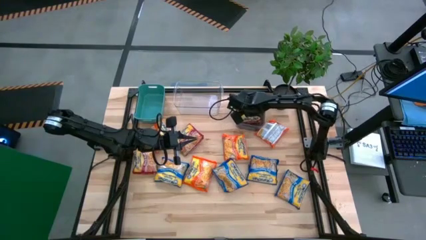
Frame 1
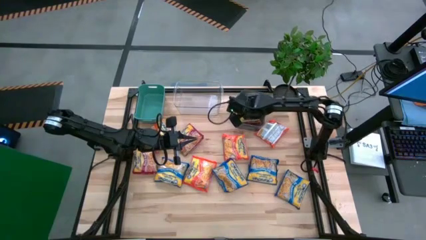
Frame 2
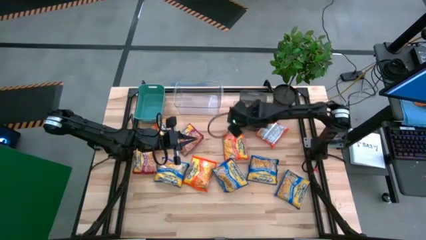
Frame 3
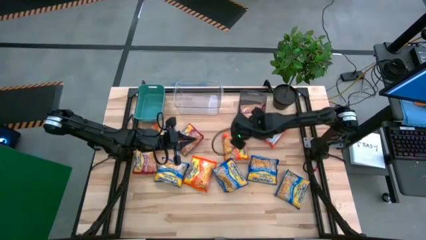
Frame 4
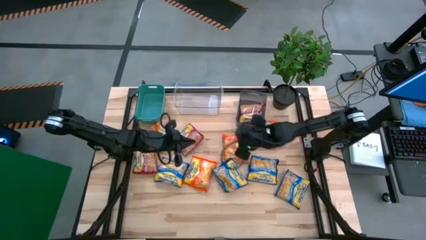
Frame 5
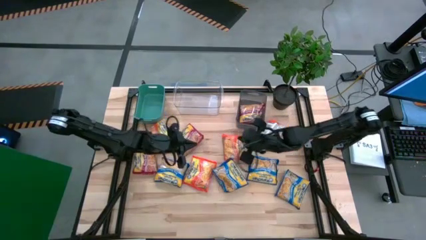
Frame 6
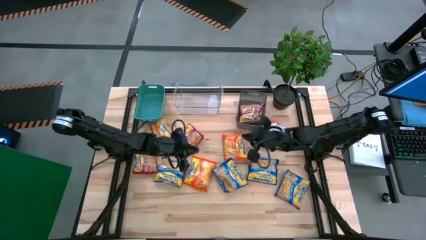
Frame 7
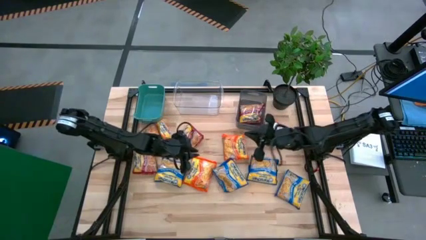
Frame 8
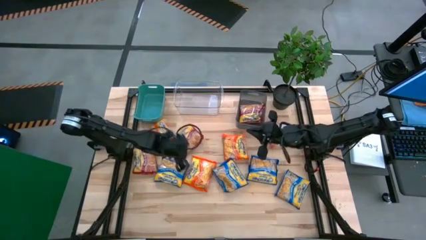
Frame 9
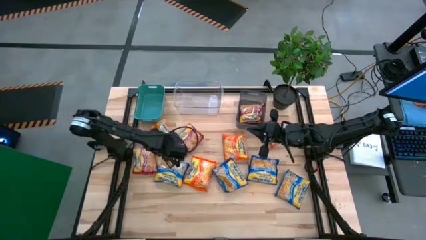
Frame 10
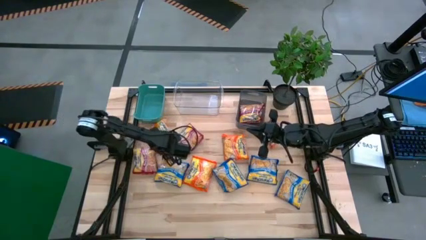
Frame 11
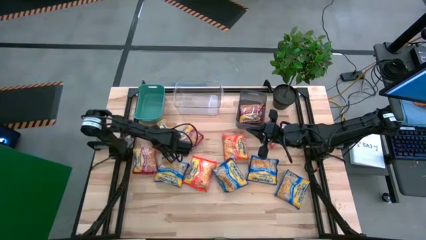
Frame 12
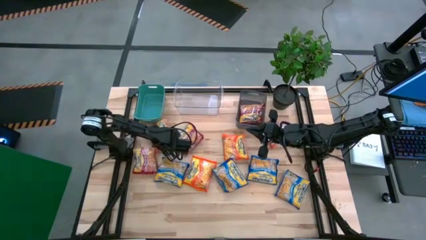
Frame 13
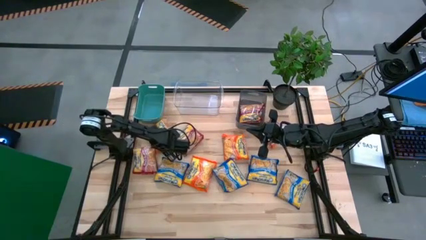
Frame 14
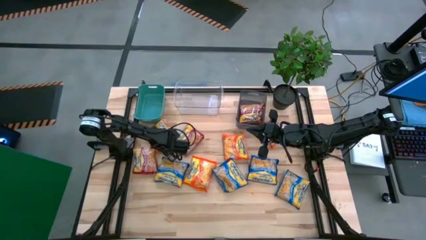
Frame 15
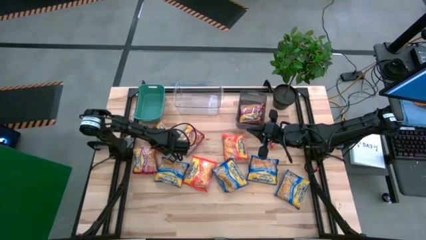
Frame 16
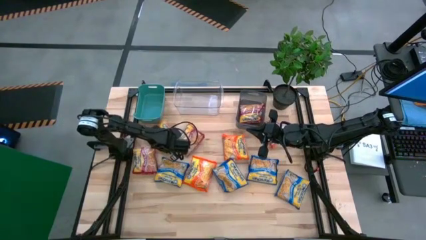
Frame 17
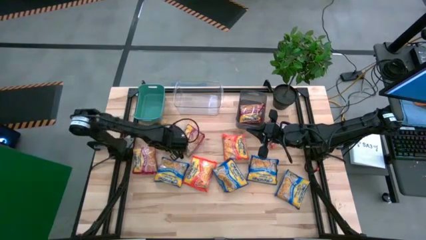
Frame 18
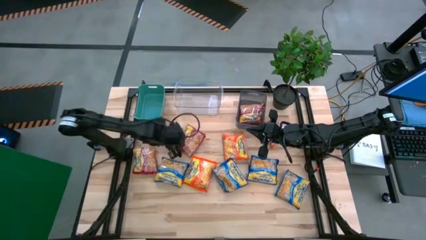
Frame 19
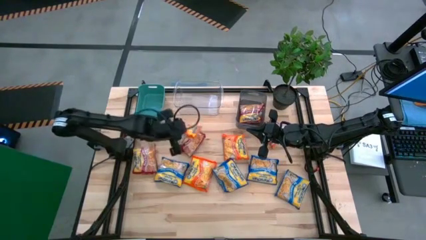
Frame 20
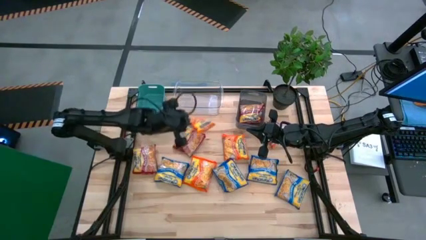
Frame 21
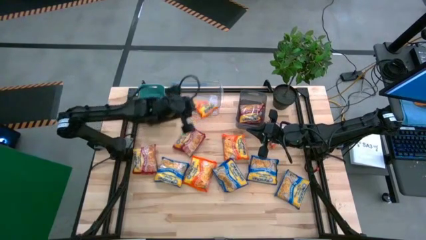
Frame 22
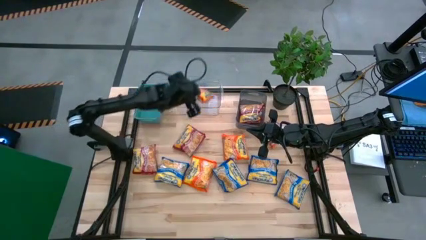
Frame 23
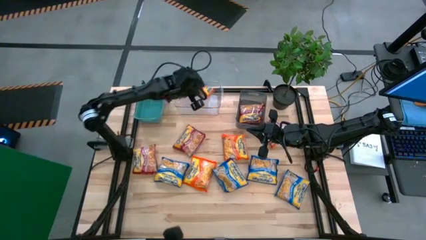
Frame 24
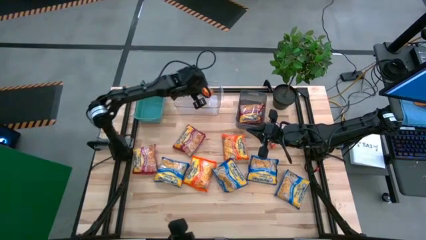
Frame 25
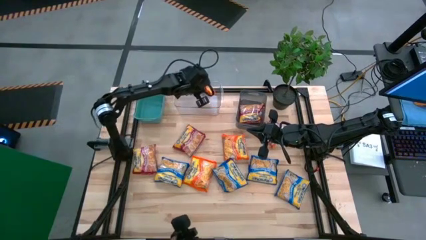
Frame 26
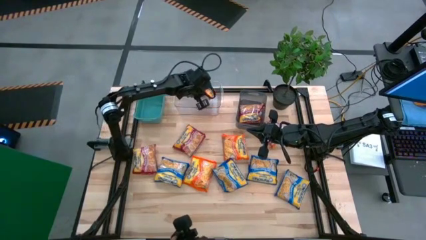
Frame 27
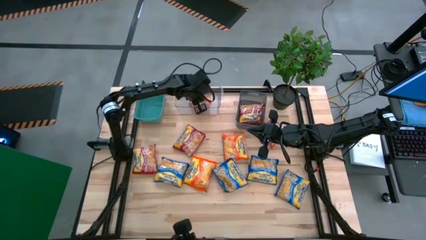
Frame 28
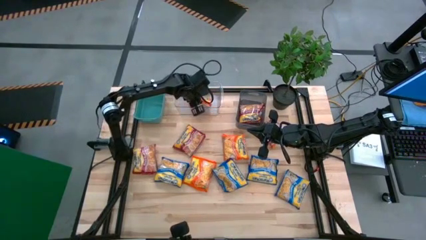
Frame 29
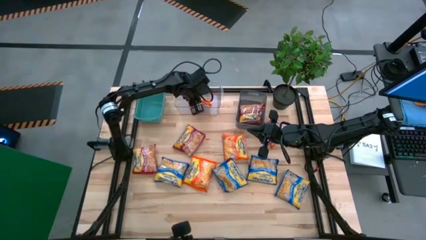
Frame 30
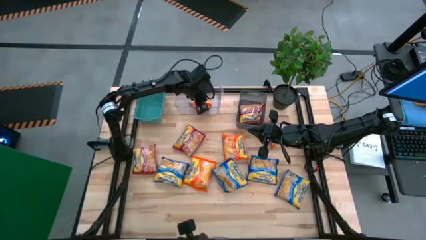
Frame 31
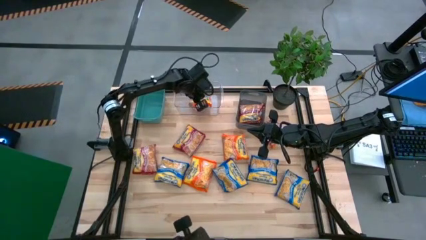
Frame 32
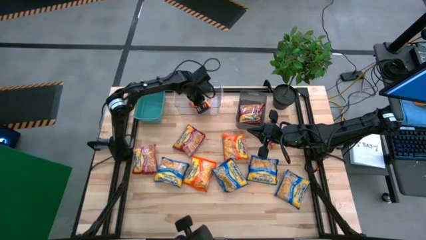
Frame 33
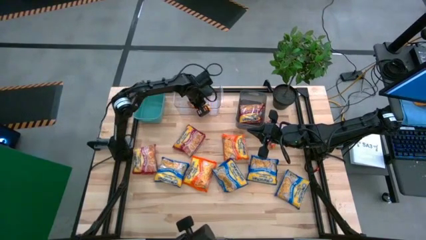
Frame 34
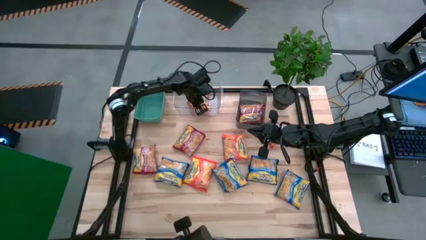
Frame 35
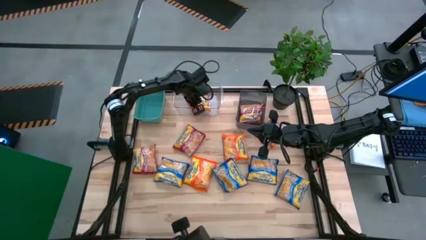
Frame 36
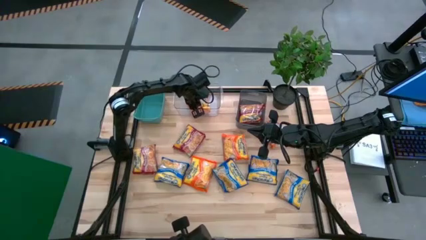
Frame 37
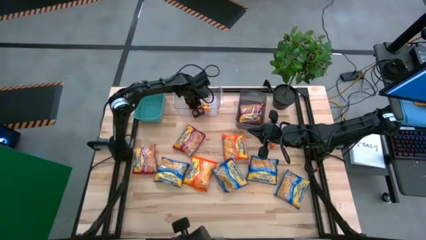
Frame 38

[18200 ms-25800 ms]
Task: Sort Maruchan noodles
Put the orange noodle pack into the transparent bin

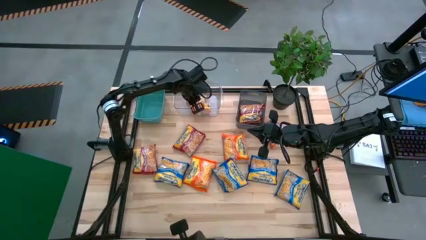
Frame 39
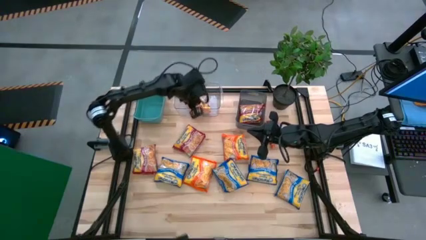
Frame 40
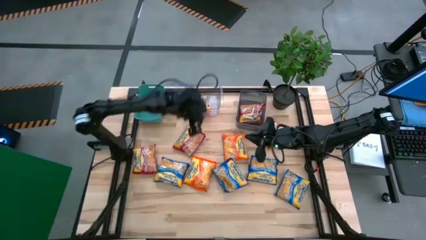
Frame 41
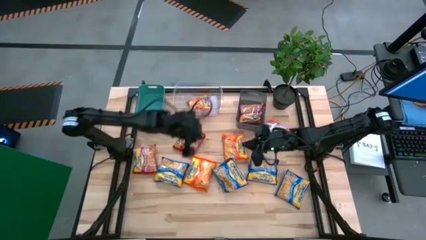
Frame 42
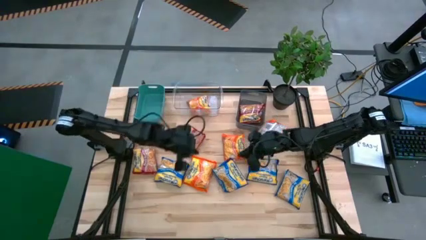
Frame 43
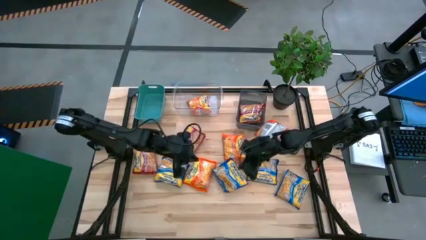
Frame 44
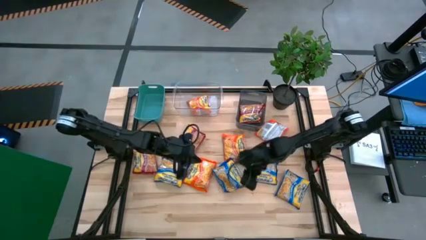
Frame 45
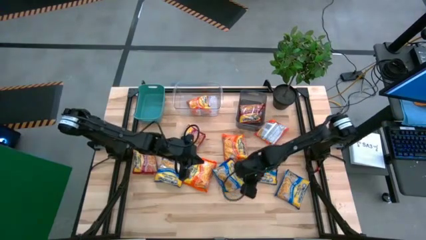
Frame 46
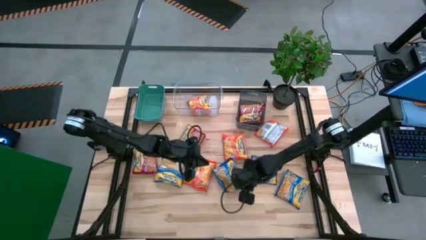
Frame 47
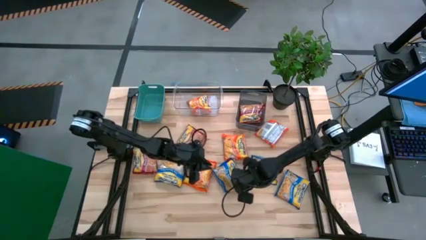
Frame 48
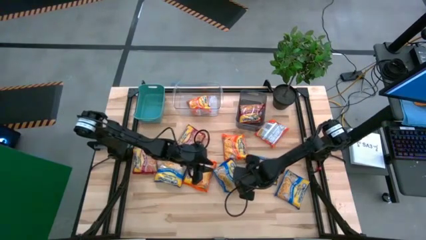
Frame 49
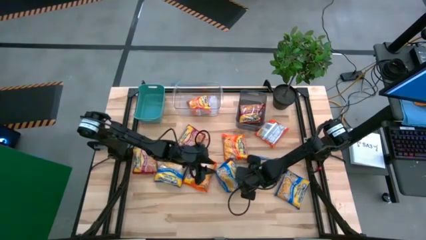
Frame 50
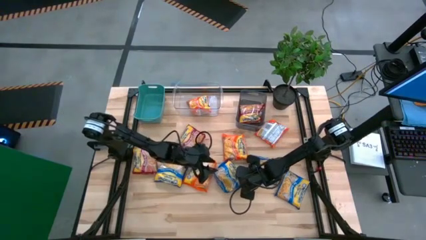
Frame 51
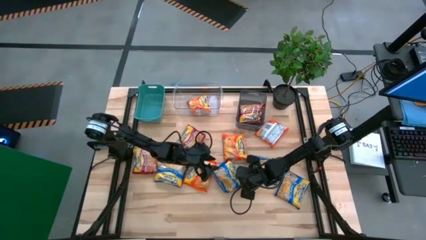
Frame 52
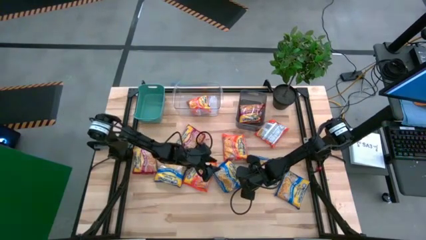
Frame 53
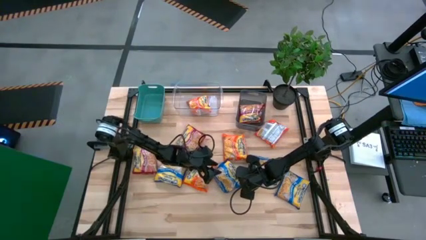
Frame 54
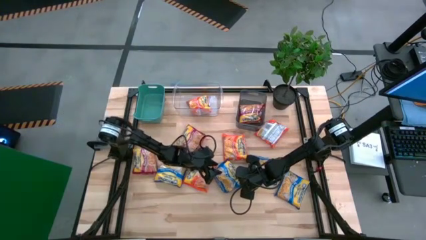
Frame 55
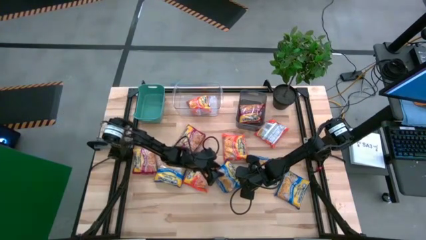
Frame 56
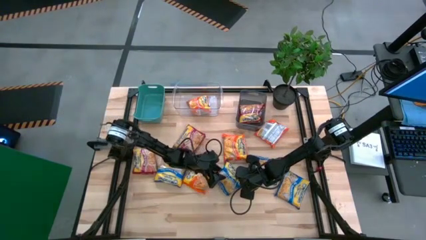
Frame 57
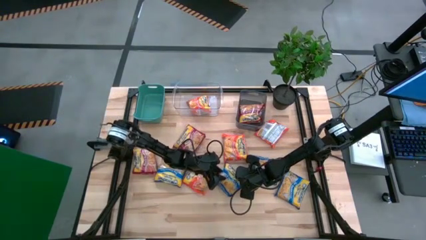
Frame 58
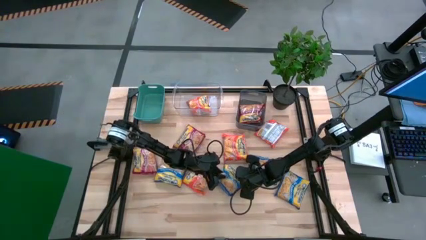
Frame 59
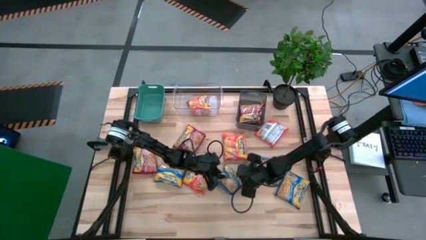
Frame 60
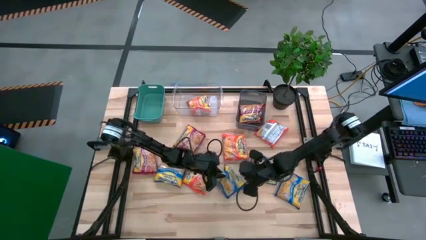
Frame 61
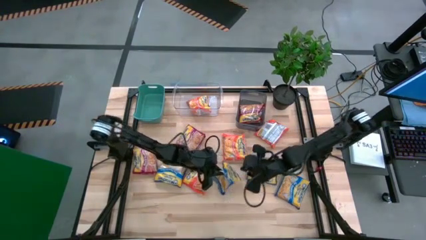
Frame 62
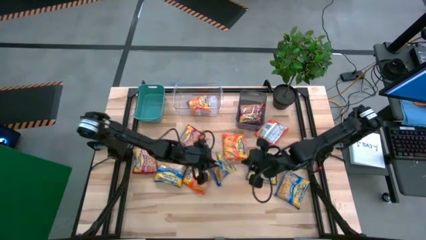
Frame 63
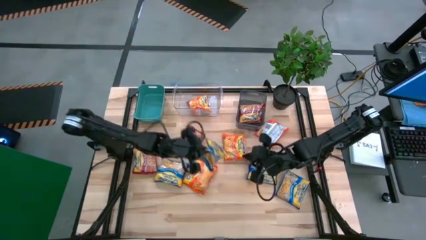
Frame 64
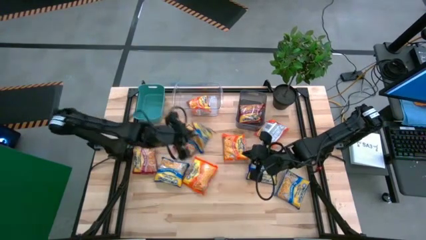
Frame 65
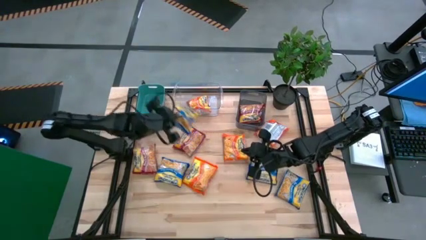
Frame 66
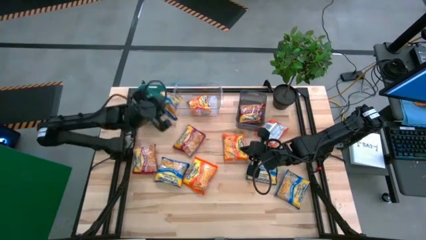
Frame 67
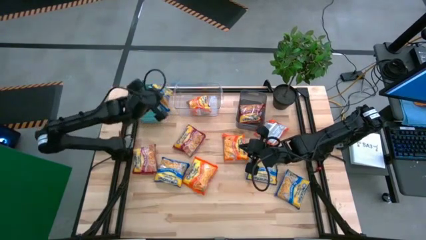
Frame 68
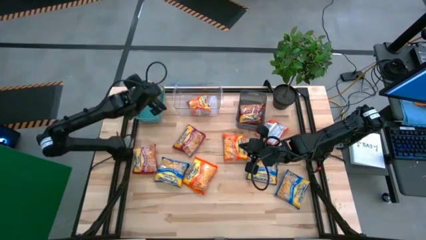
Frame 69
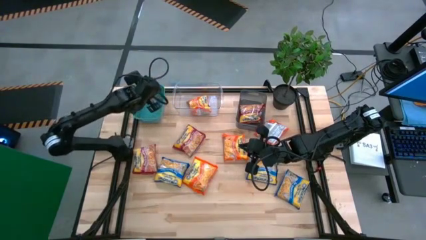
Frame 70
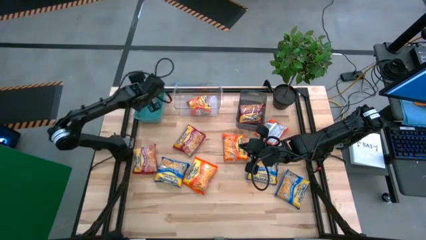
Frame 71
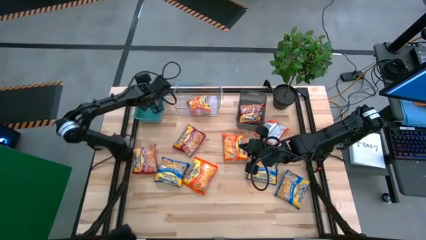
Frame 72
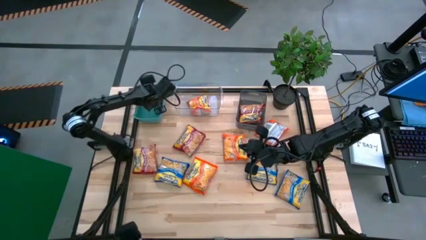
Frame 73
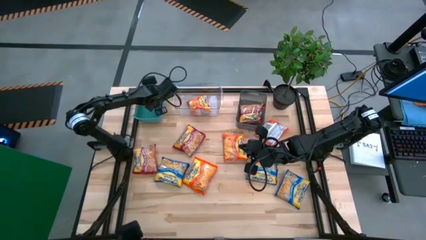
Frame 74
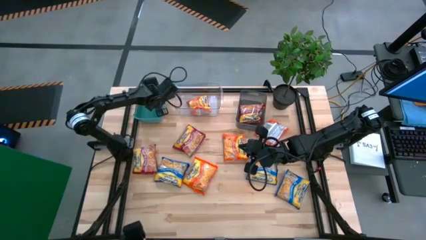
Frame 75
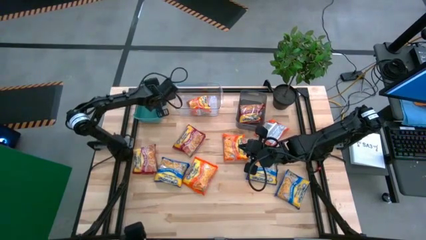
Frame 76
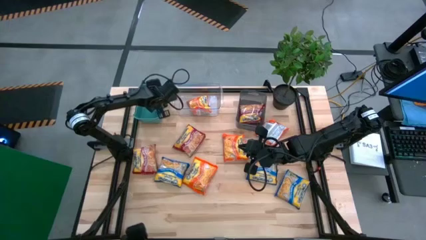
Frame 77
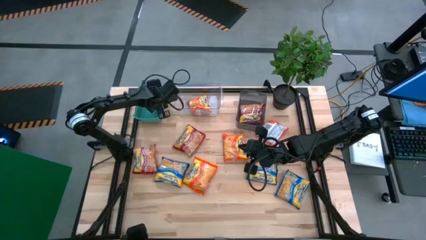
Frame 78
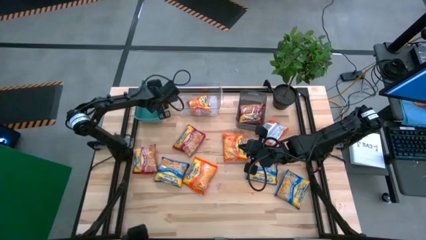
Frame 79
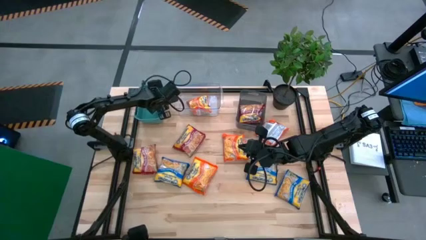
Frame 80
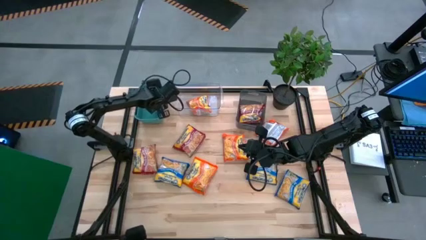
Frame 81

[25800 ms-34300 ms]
Put the blue noodle pack into the green bin

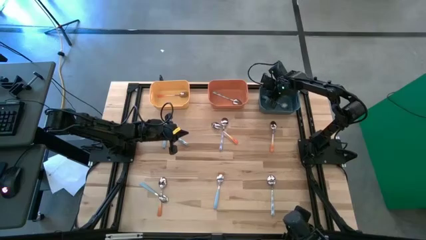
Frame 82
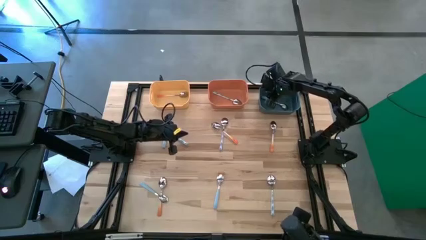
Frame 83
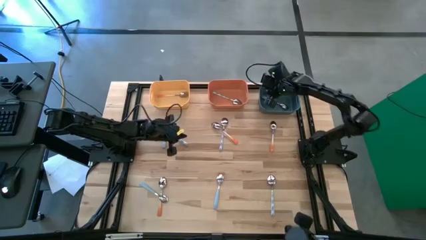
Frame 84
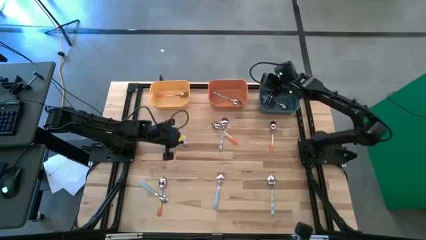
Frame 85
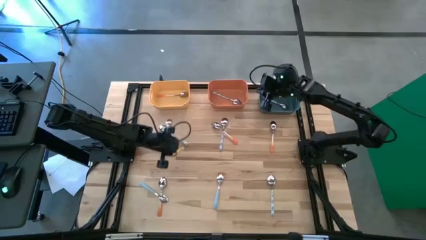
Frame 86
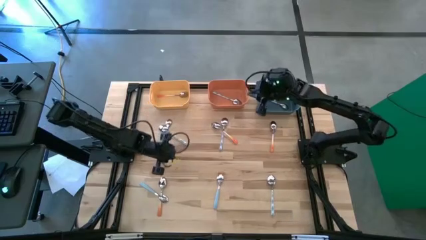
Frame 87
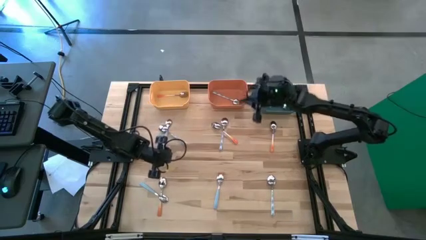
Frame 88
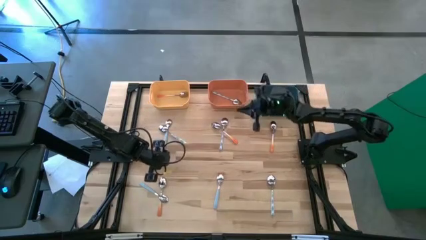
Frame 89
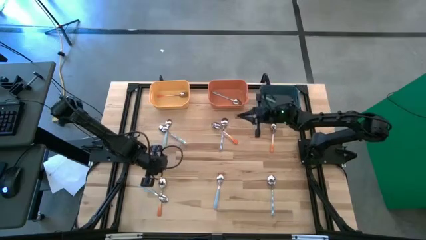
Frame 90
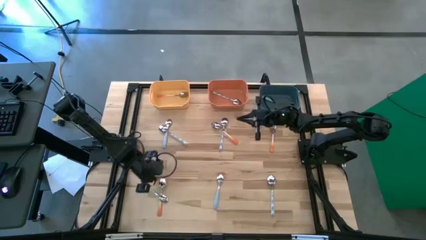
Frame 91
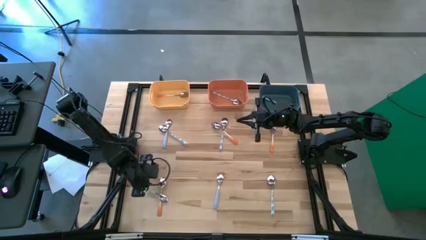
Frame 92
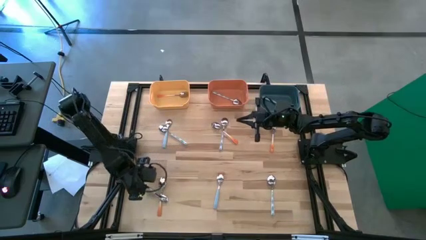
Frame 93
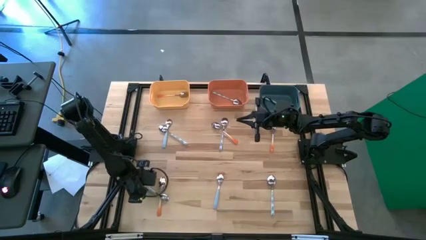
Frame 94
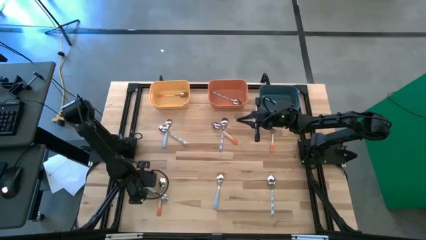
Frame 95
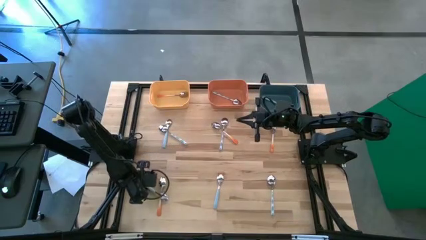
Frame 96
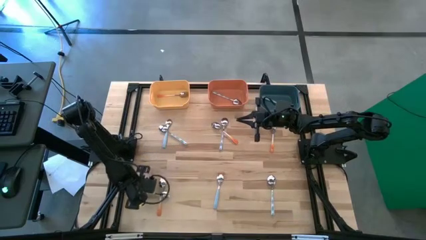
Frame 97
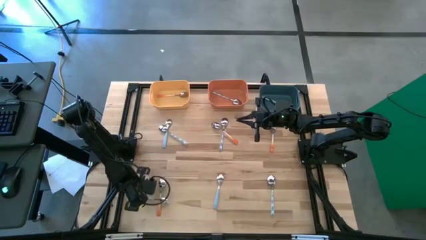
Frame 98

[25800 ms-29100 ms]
Task: Sort silverware by color (type)
Put the blue spoon into the blue bin
